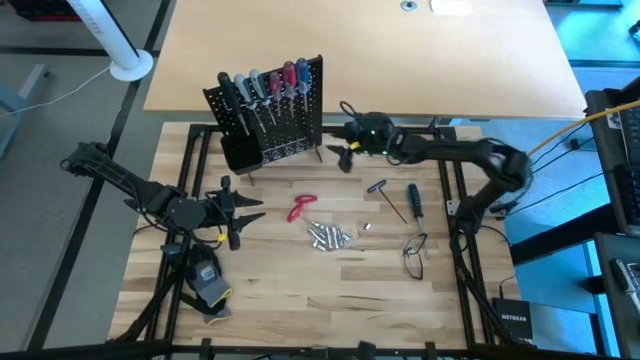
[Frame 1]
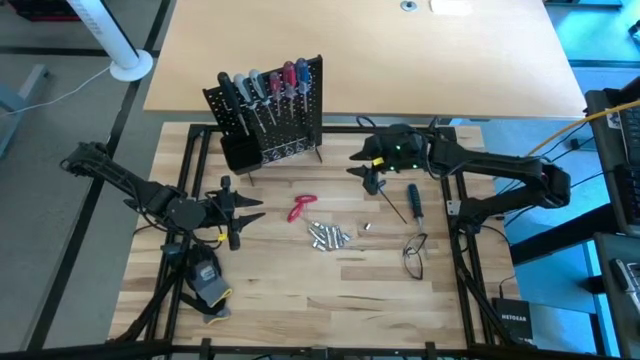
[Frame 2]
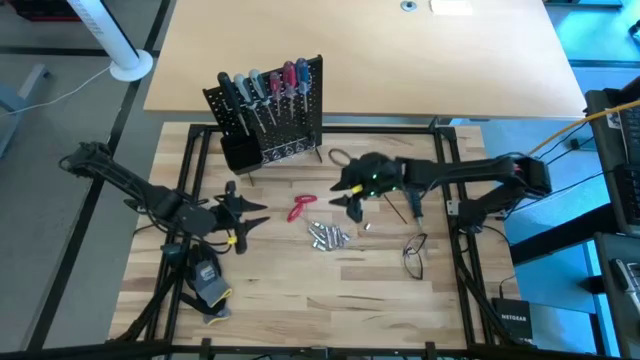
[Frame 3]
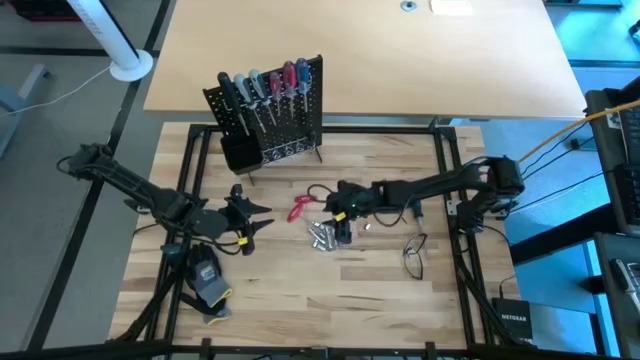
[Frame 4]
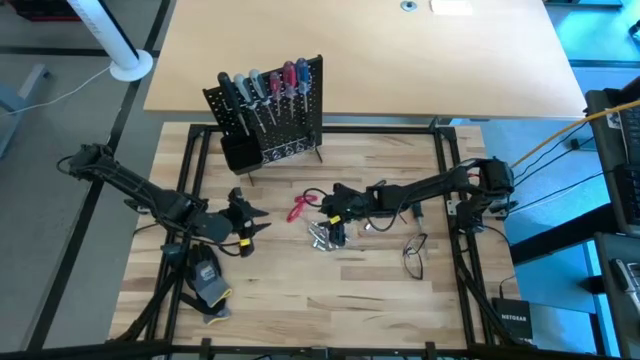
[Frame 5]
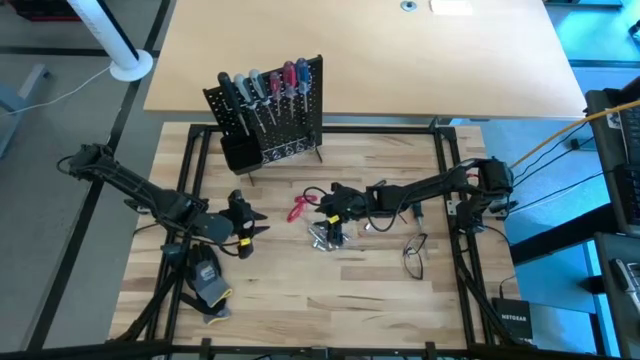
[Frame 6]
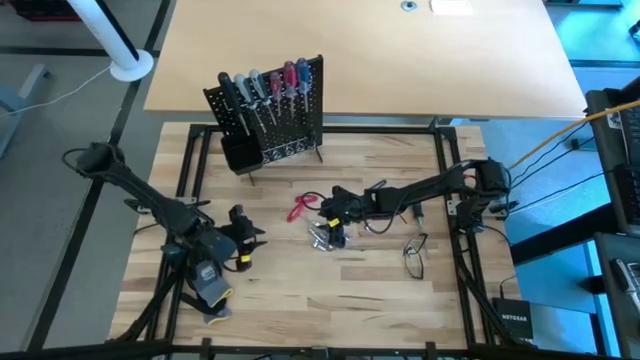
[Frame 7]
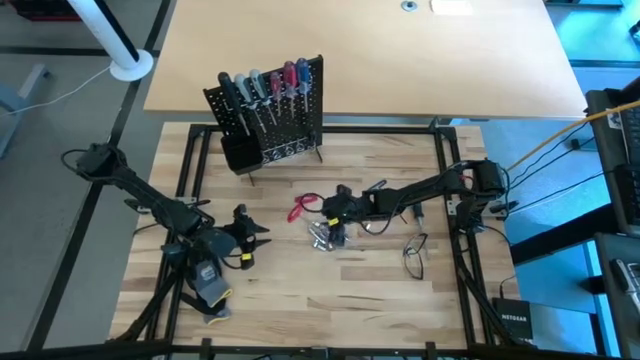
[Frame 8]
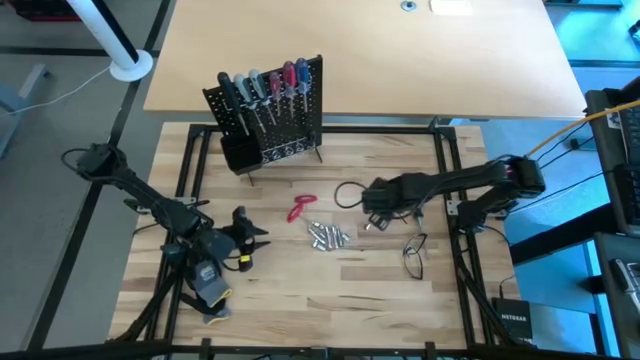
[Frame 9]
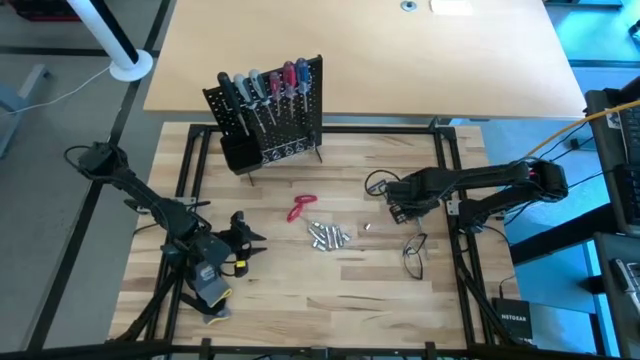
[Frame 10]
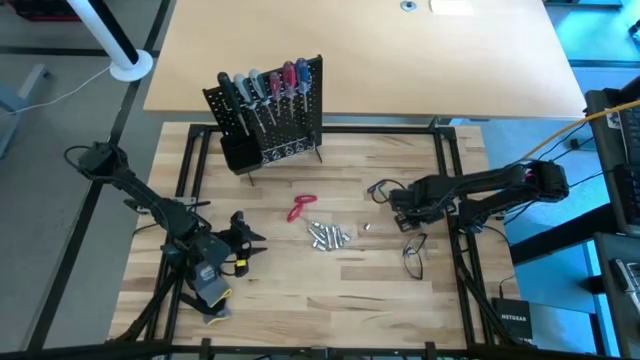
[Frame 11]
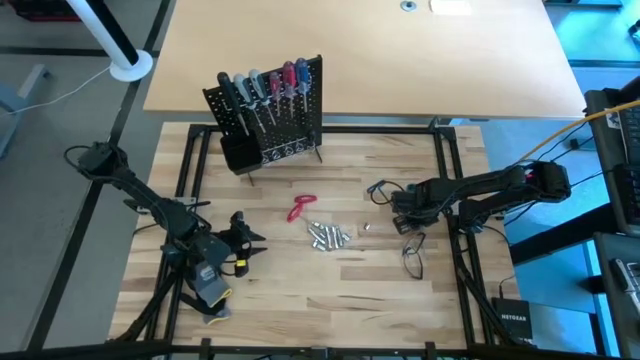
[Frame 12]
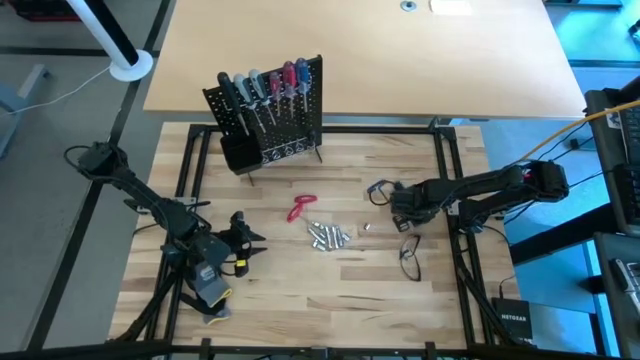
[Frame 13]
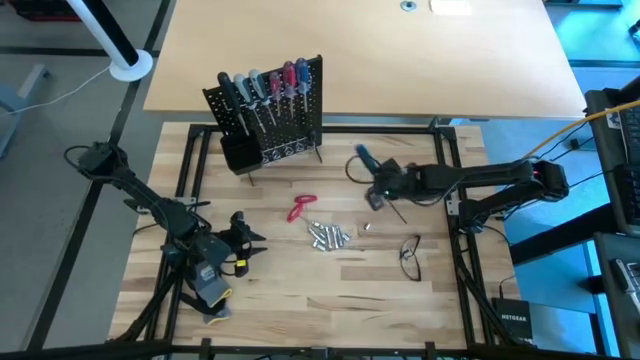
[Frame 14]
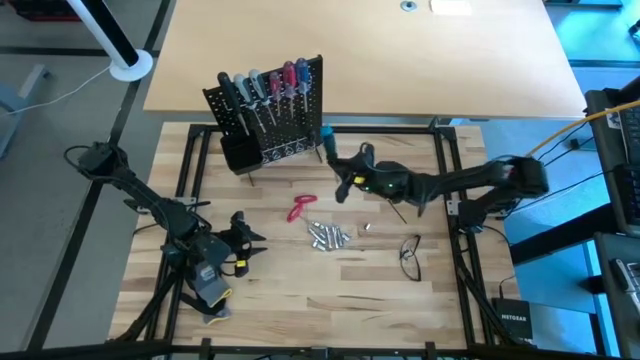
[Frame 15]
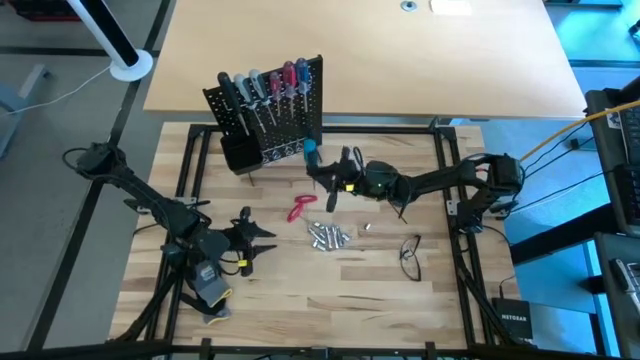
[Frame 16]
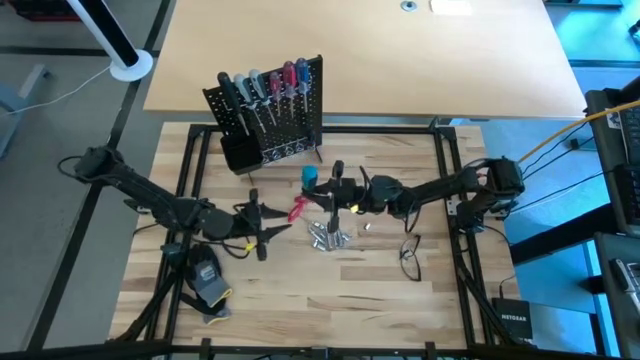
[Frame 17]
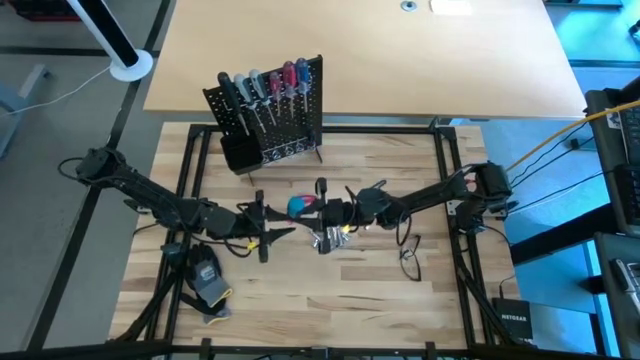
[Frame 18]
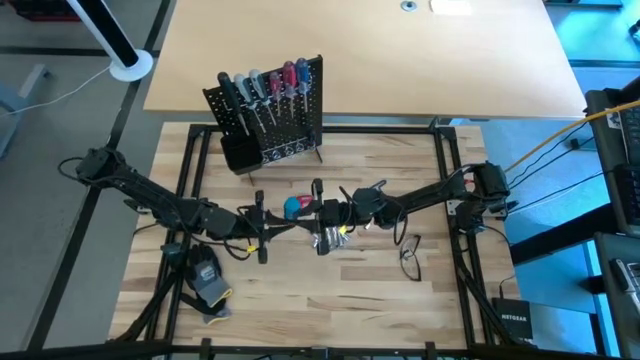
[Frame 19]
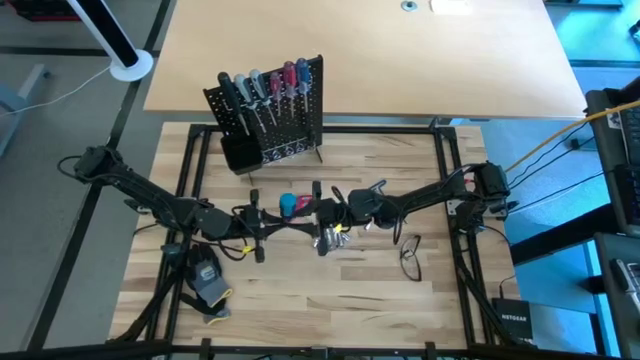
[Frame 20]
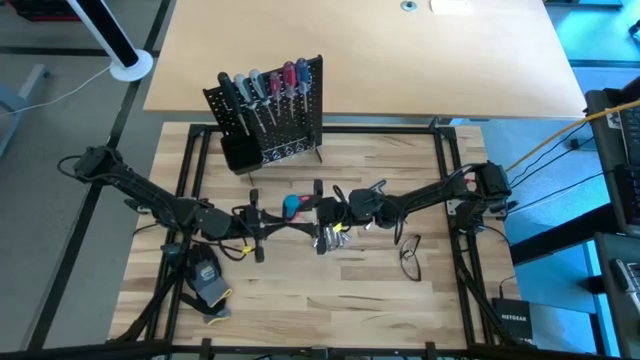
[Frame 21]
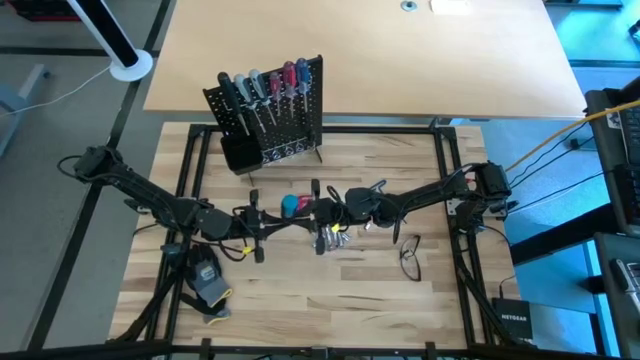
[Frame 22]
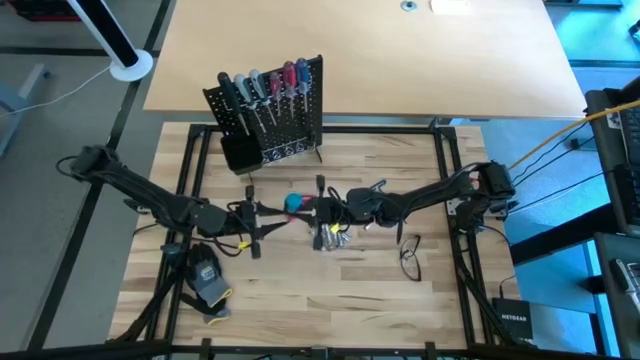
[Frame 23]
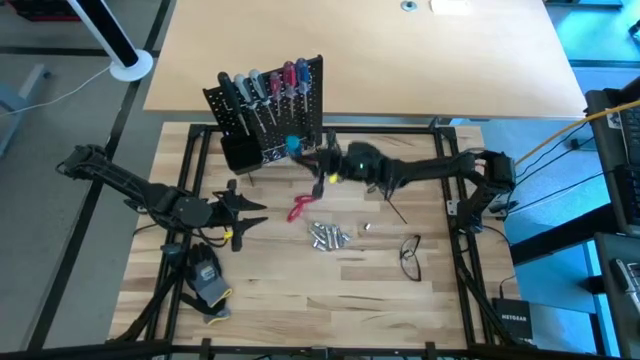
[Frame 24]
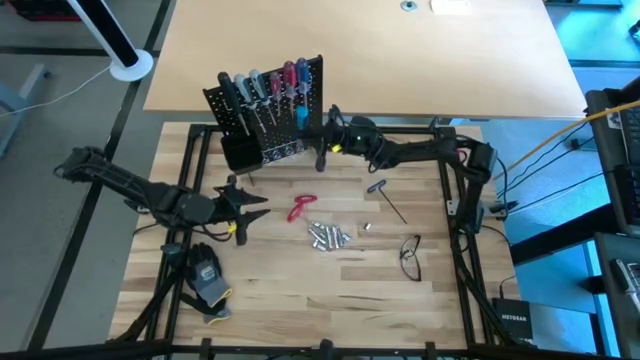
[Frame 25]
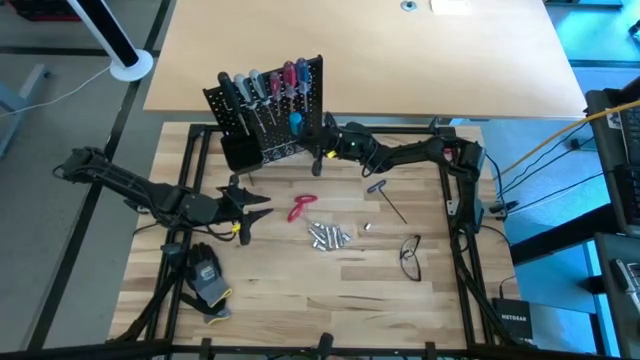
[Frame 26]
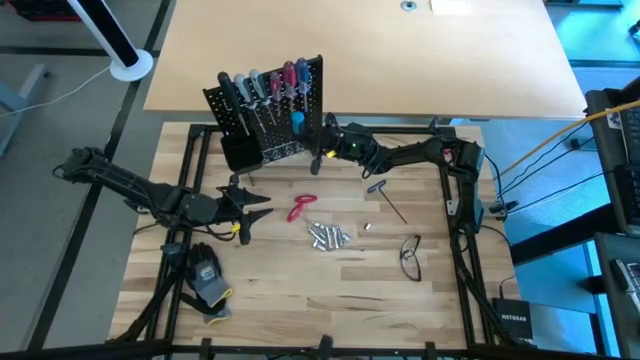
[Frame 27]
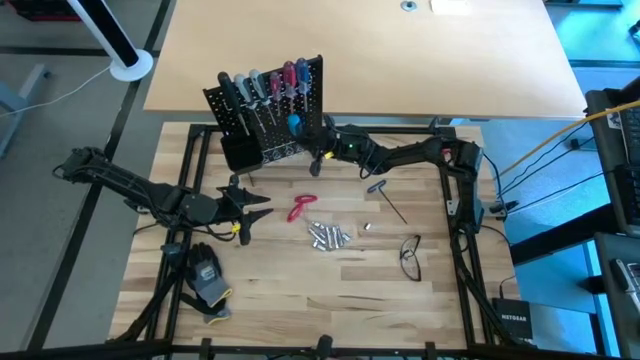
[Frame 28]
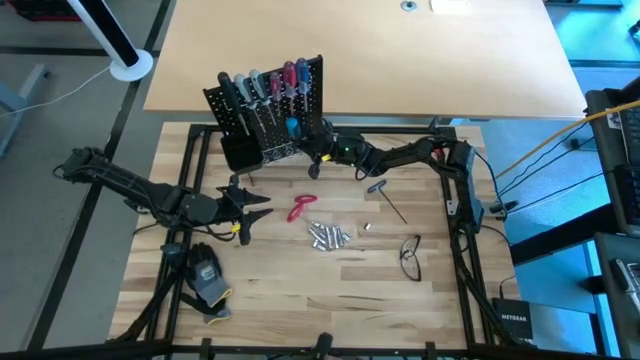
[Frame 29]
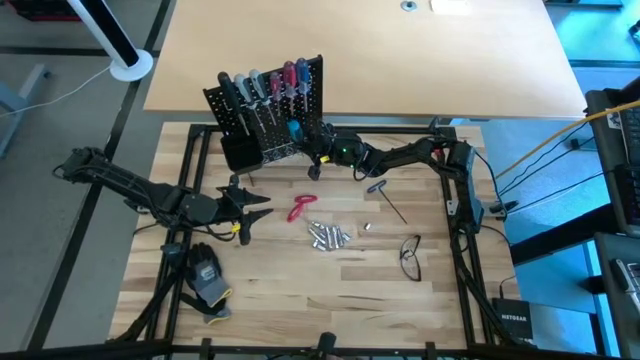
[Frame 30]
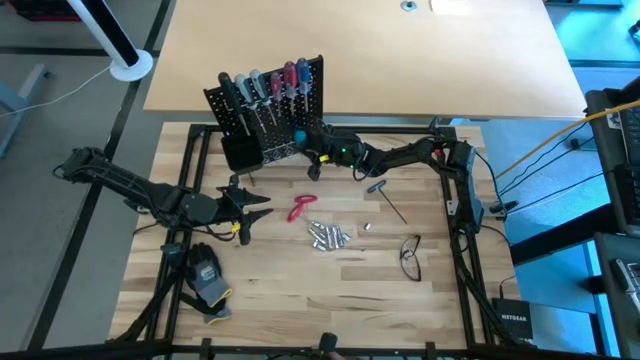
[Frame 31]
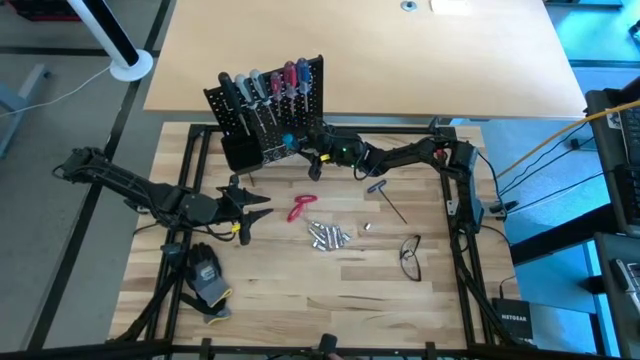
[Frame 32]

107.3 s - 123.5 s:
Task: Hang tools onto peg board
Hang the blue screwdriver onto the peg board

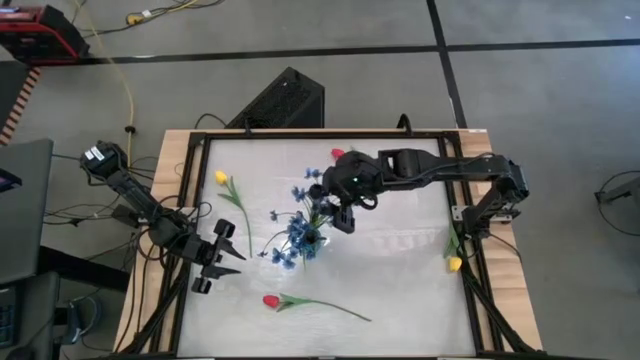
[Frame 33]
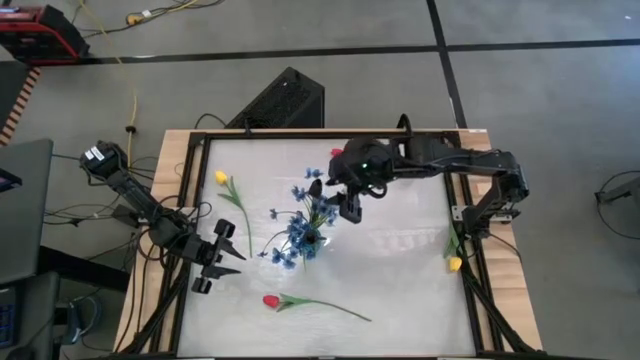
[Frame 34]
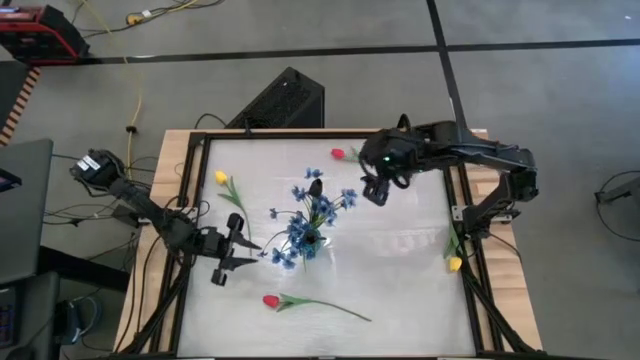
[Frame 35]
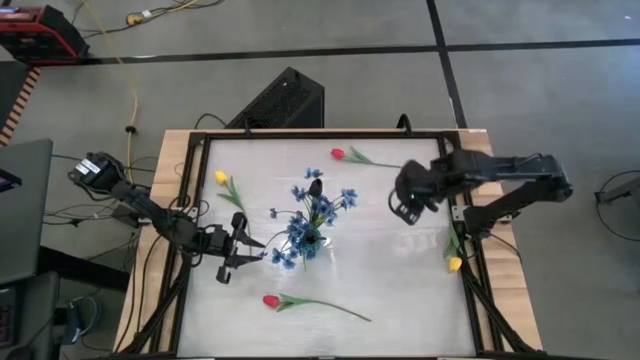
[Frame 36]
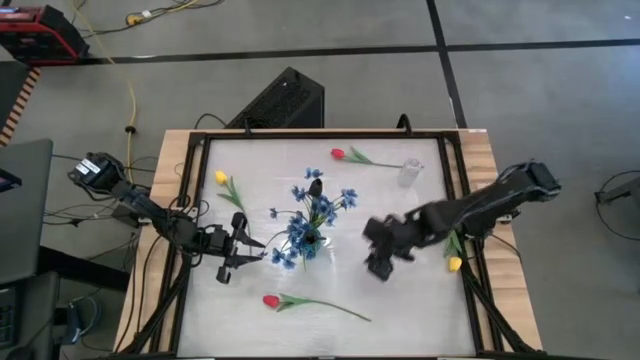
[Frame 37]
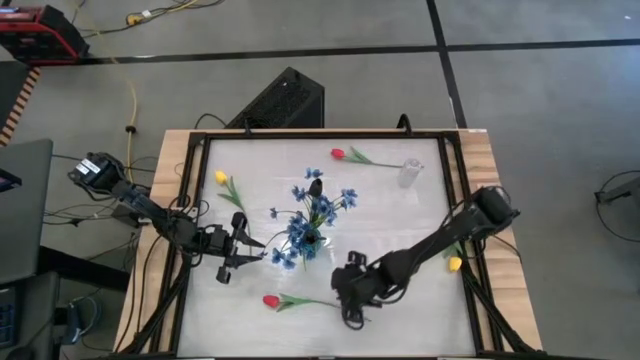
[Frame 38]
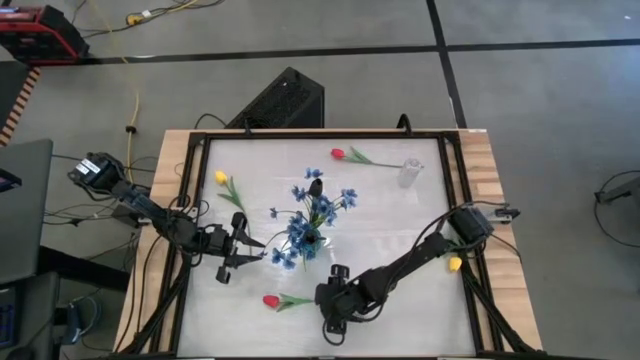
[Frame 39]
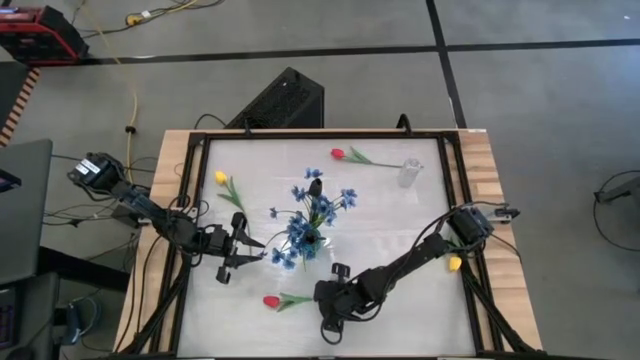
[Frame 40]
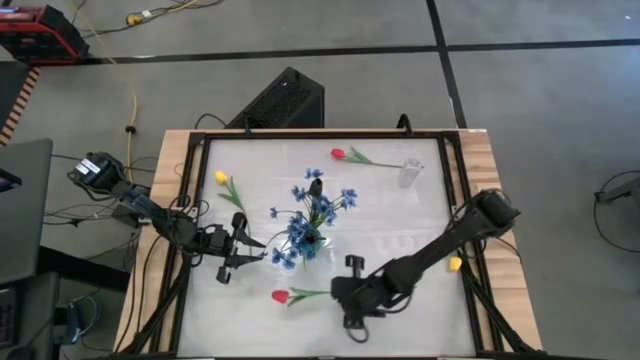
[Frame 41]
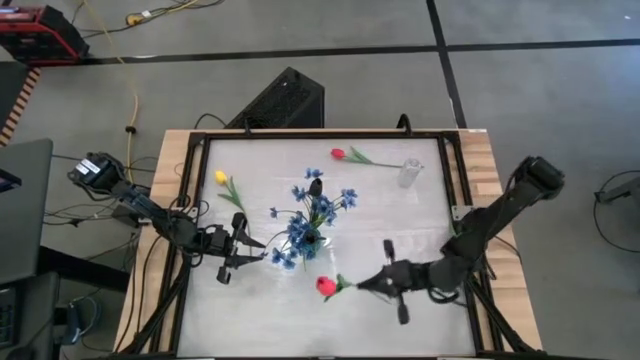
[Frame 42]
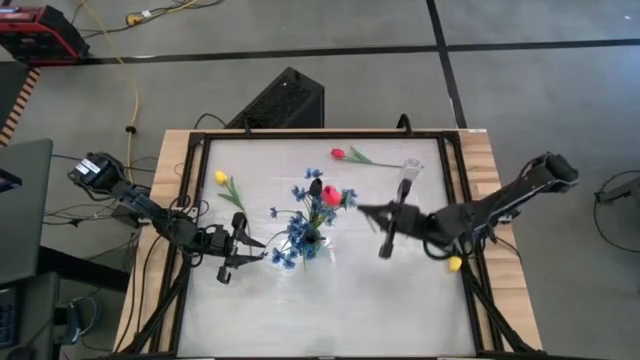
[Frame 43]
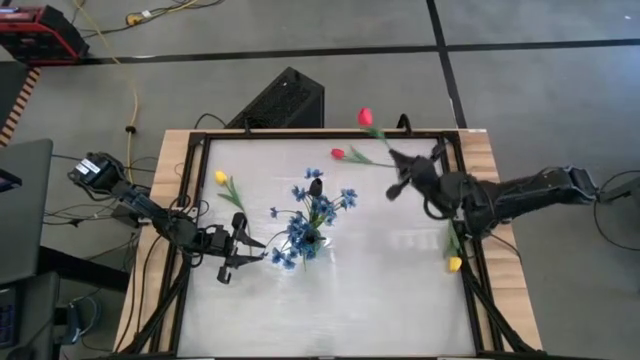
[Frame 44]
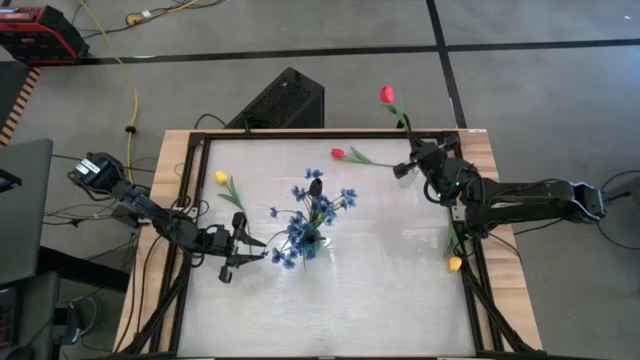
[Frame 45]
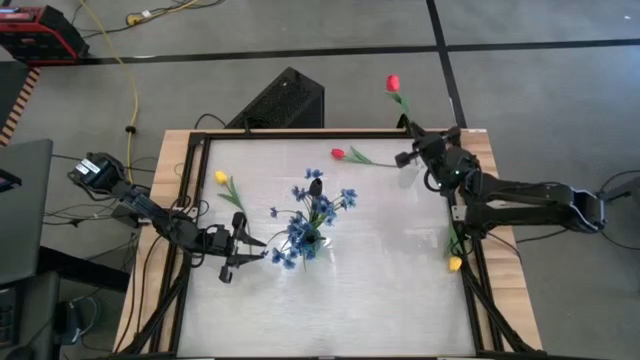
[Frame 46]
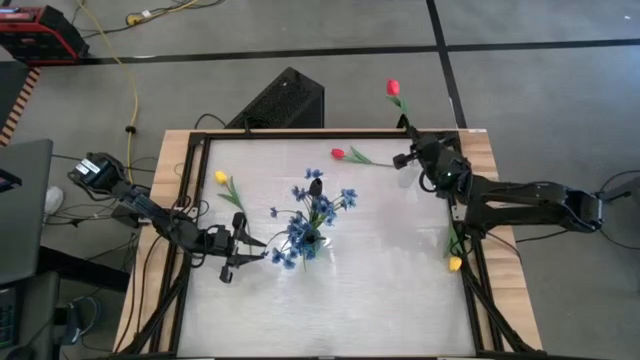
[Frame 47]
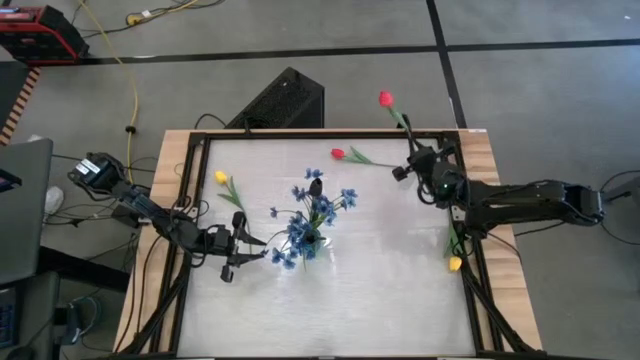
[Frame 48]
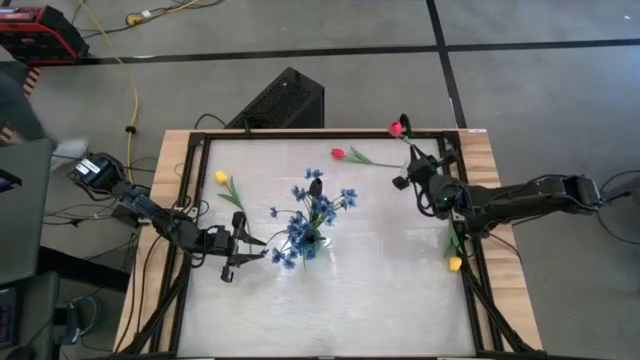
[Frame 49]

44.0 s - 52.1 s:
Task: Sort flowers into vase by color
Put the bottom red tulip into the transparent vase
